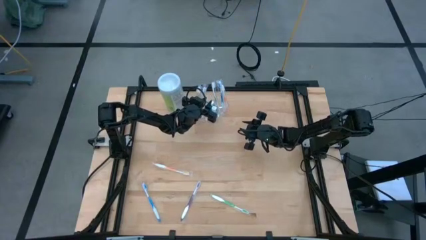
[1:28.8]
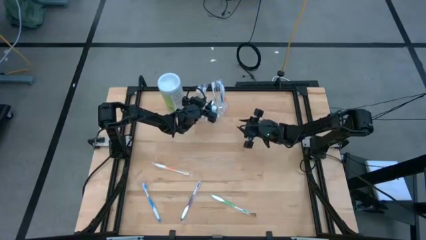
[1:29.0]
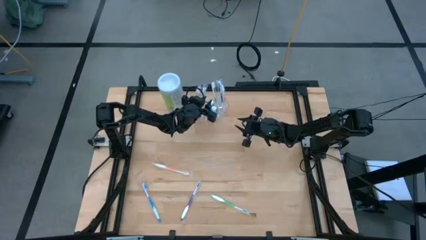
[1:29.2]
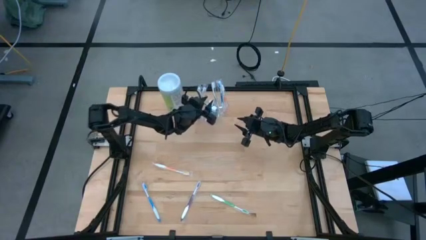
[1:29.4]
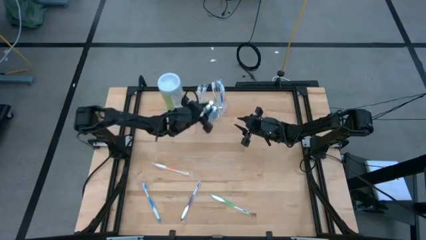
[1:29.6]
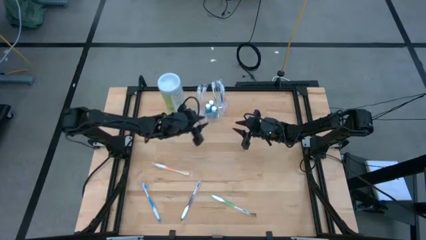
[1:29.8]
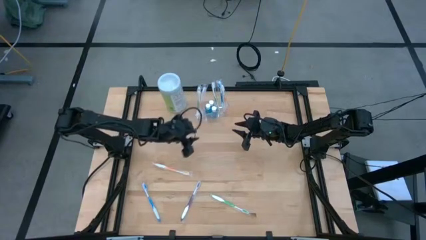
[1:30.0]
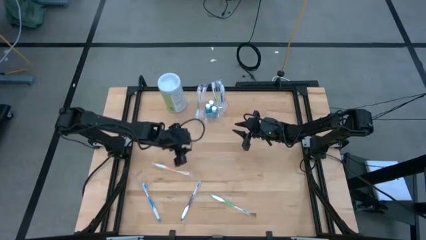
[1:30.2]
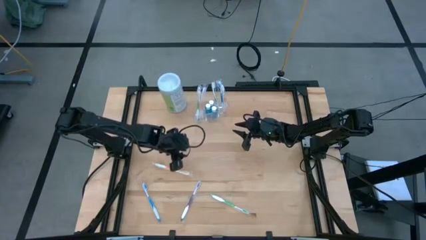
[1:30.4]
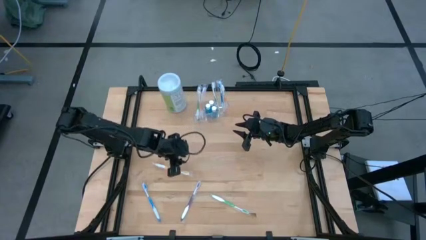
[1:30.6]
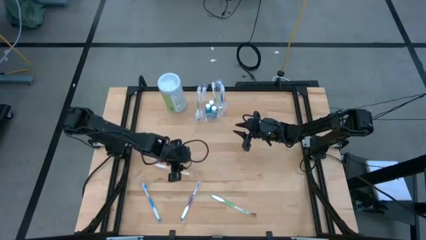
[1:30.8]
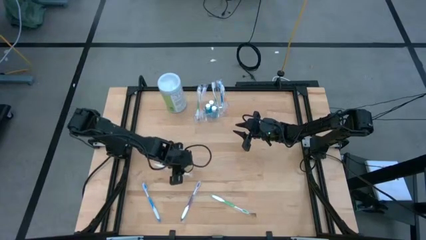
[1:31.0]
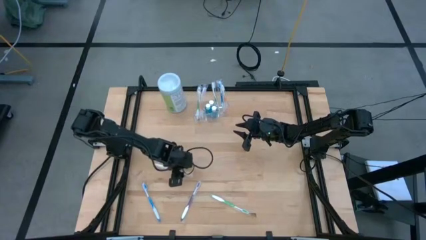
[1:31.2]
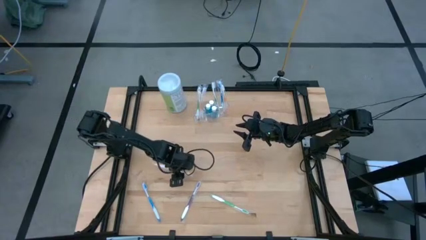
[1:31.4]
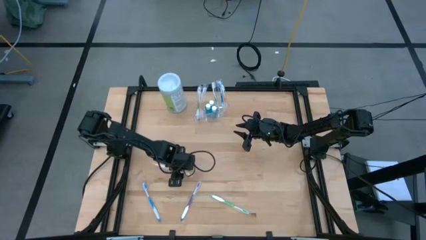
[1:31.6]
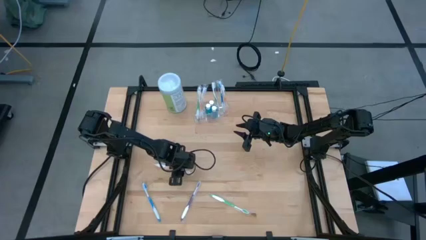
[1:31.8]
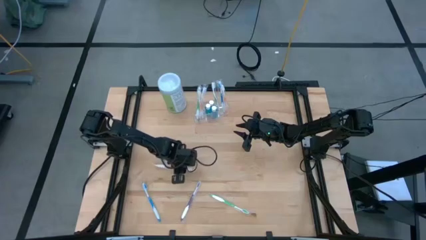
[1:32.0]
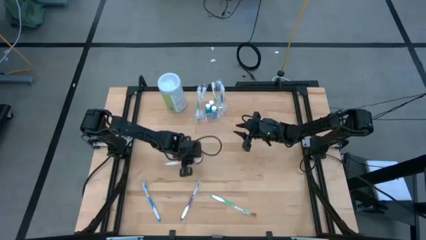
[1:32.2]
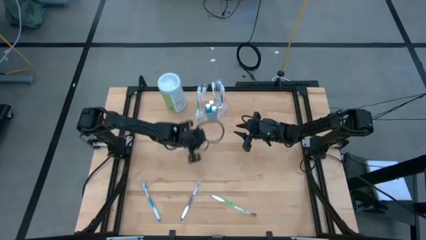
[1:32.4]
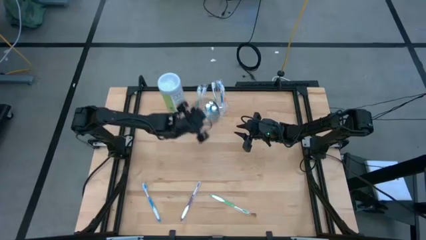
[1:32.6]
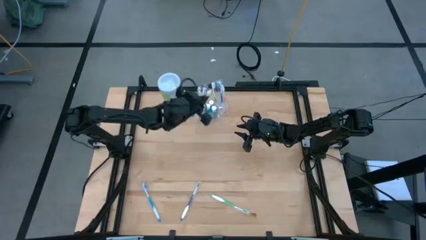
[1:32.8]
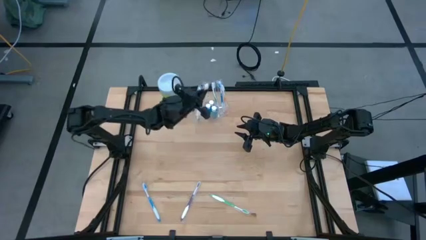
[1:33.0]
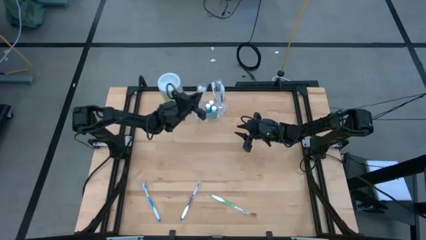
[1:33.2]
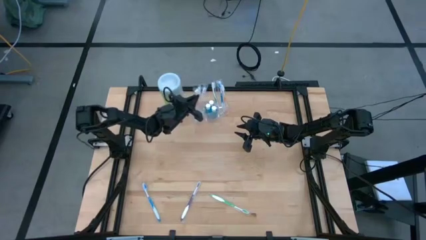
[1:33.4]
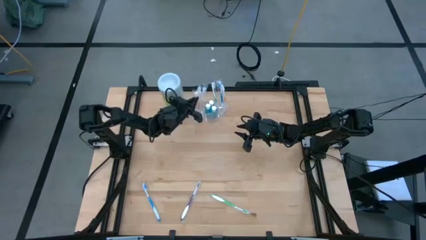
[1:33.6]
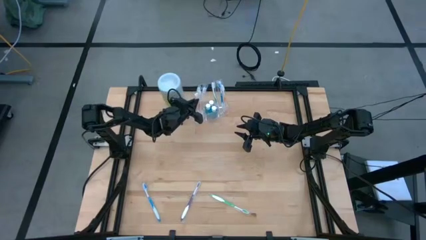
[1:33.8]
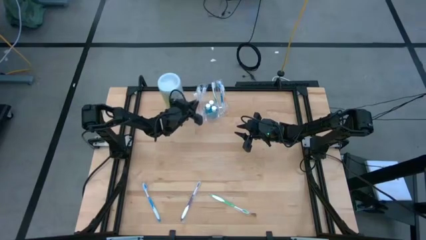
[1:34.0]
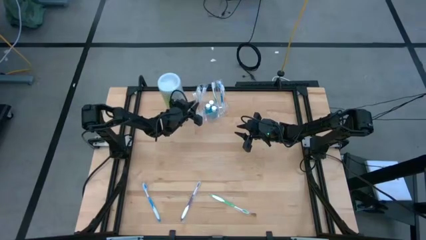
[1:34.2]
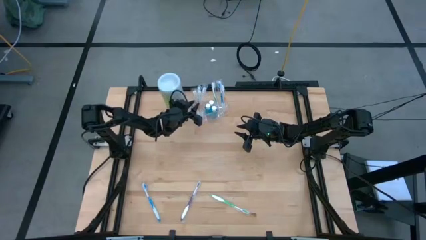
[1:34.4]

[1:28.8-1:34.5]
Task: Pick & Place toothbrushing station
Put the orange toothbrush into the transparent organizer

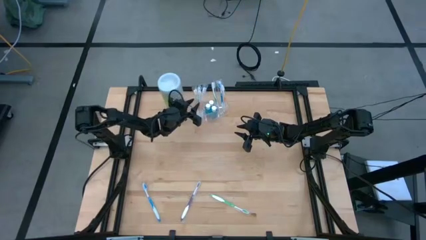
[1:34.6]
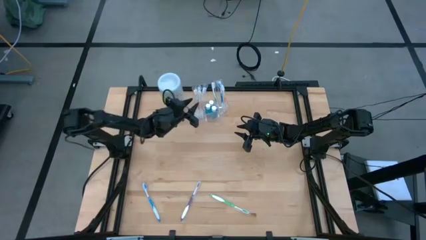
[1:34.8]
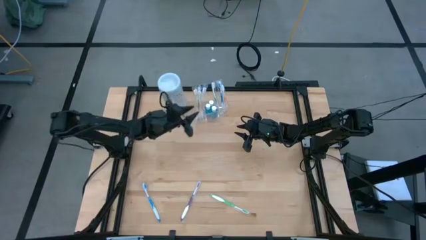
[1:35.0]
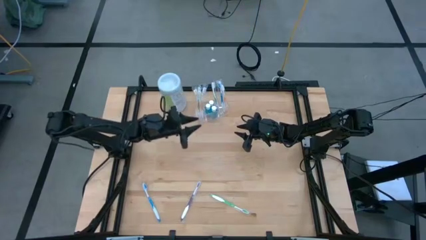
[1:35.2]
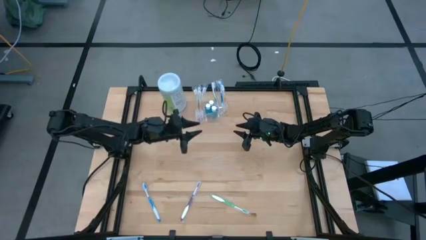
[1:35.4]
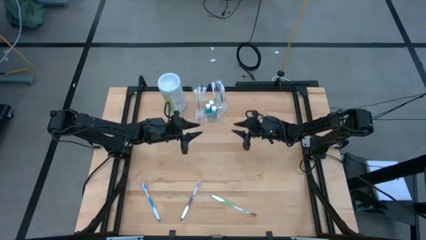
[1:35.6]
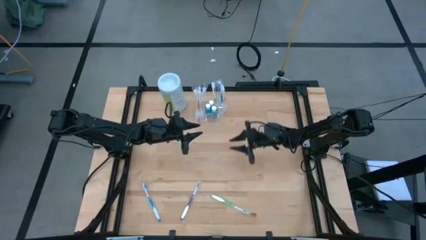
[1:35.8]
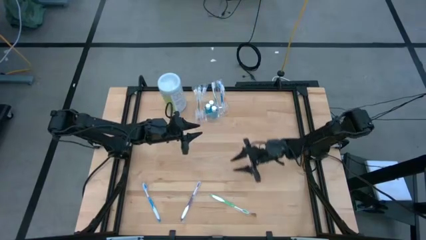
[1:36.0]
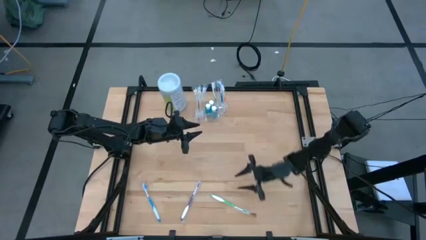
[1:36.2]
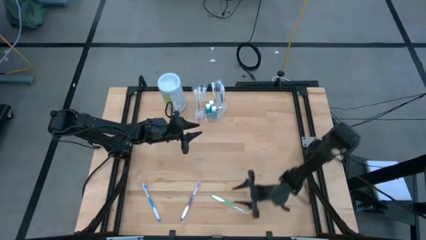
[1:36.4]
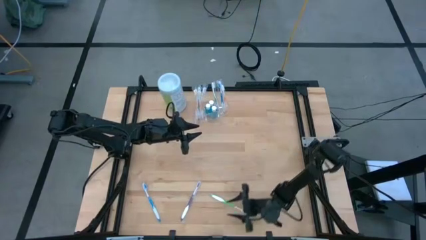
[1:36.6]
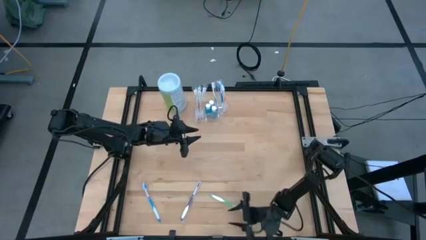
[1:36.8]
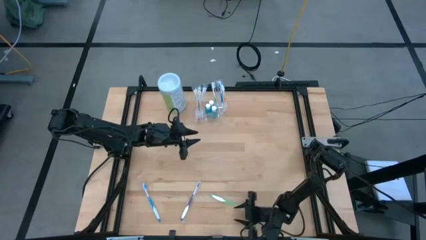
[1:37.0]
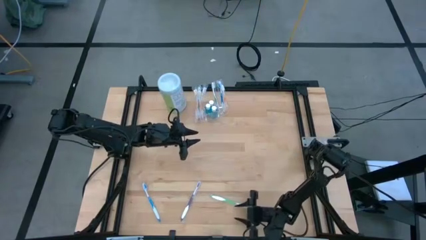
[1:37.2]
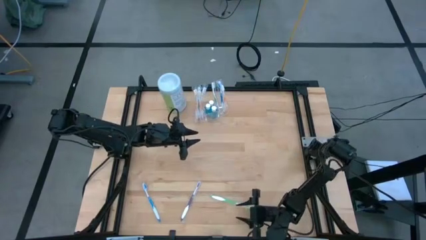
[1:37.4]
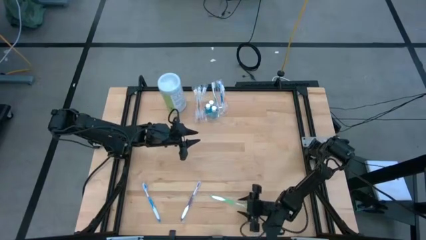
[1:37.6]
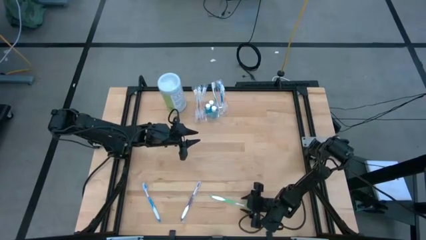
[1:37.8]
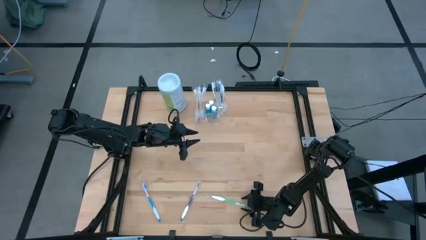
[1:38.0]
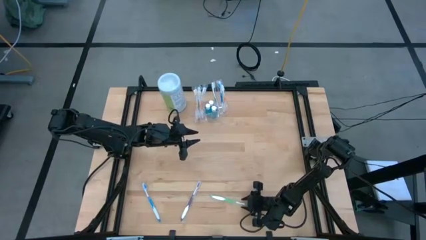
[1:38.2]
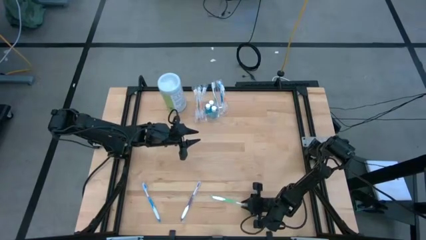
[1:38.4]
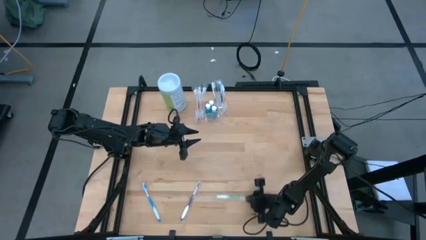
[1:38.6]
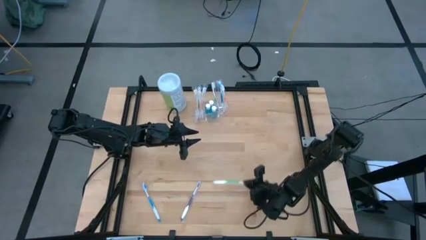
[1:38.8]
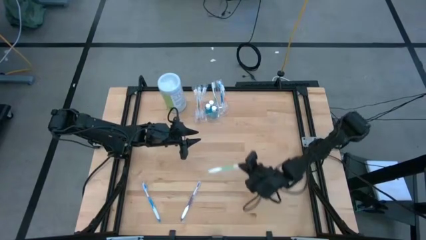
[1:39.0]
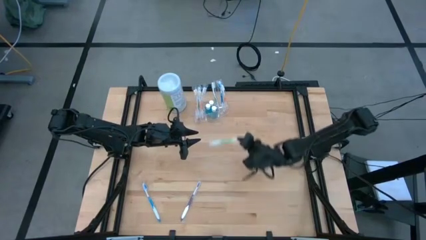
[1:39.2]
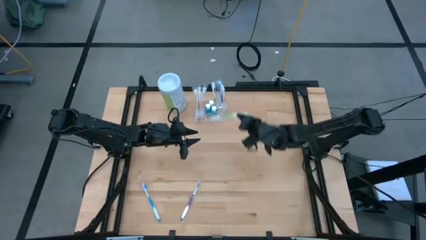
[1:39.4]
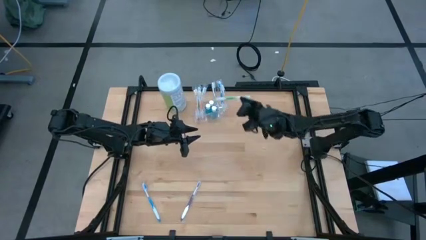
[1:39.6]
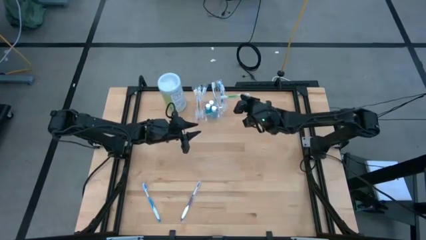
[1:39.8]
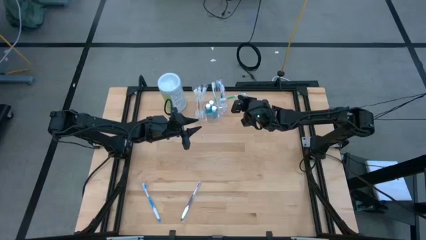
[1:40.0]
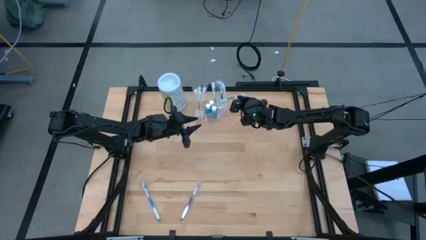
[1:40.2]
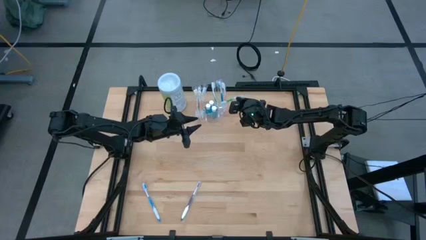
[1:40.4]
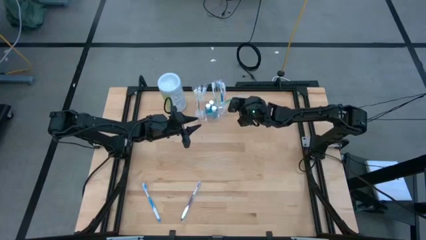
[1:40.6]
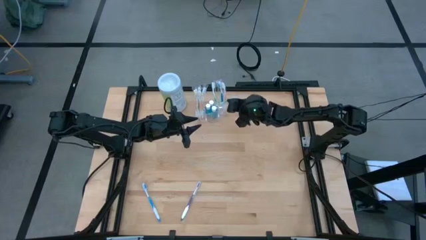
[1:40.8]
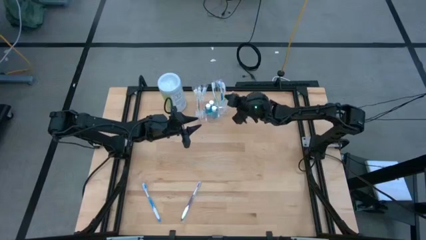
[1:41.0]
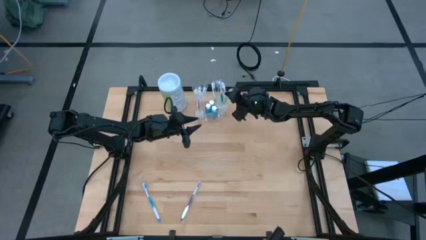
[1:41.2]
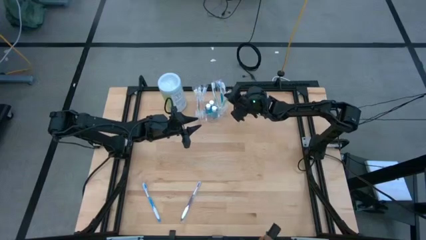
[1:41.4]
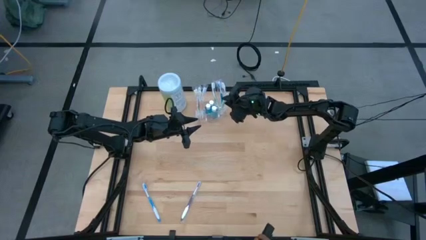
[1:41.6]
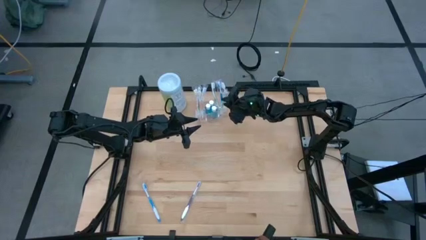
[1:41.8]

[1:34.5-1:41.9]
Put the green toothbrush into the transparent organizer
